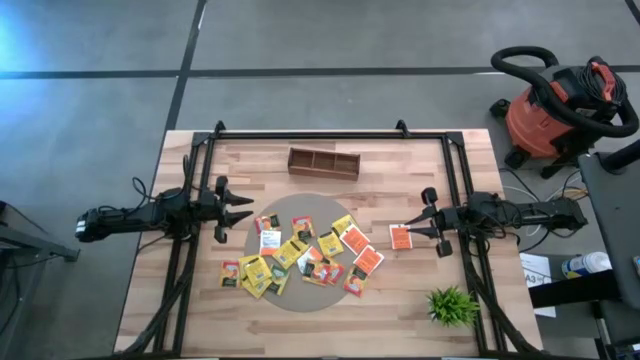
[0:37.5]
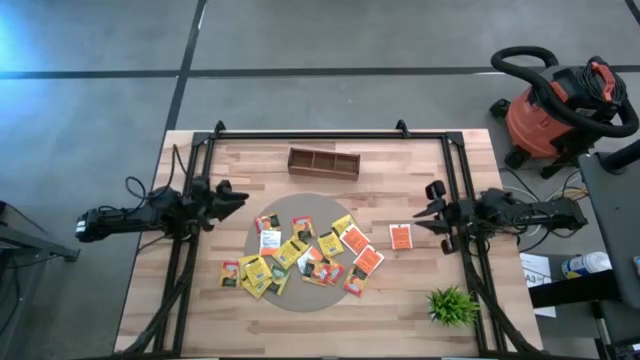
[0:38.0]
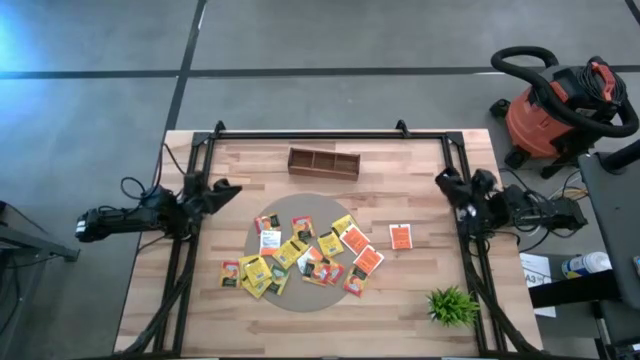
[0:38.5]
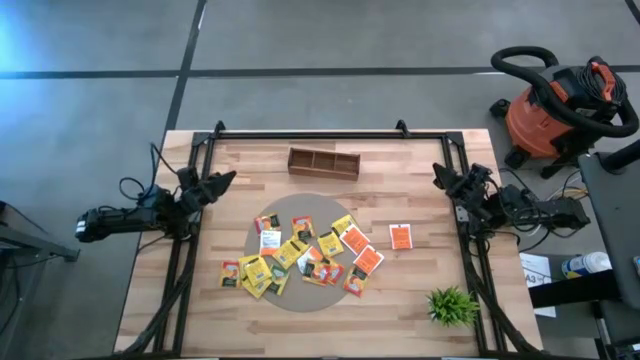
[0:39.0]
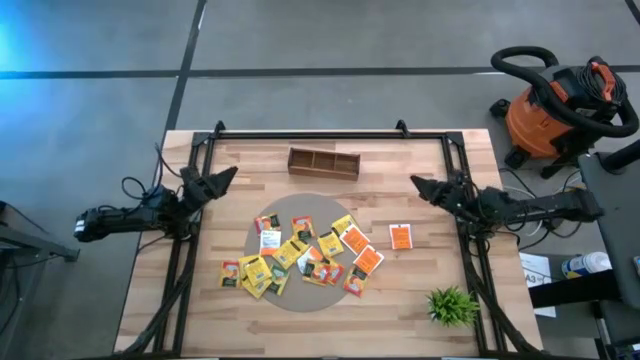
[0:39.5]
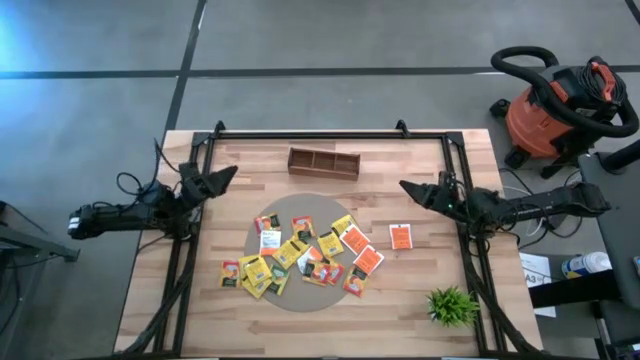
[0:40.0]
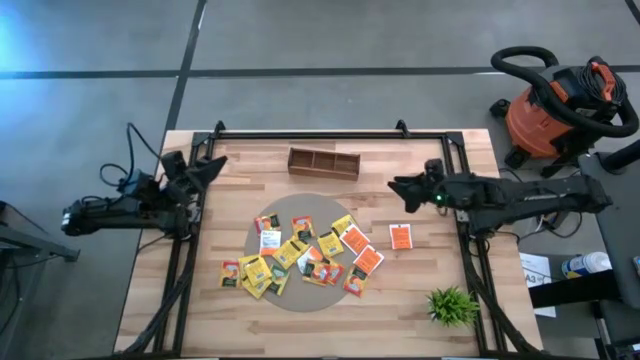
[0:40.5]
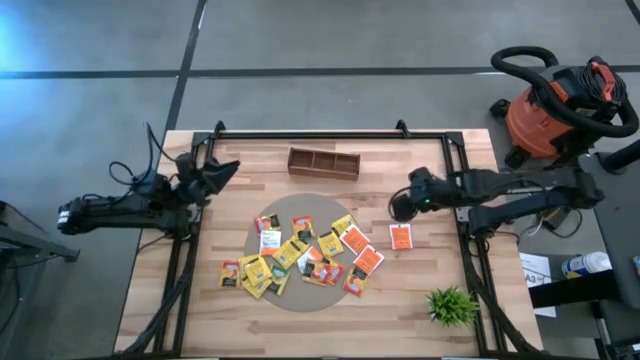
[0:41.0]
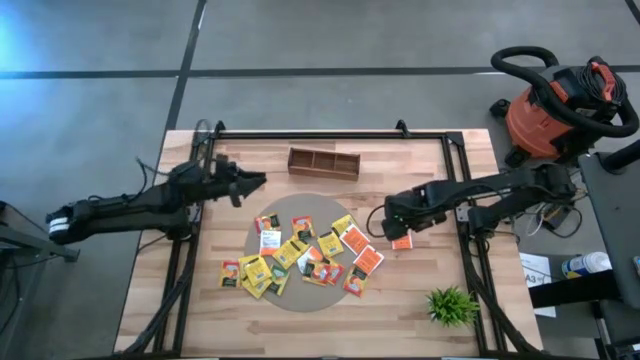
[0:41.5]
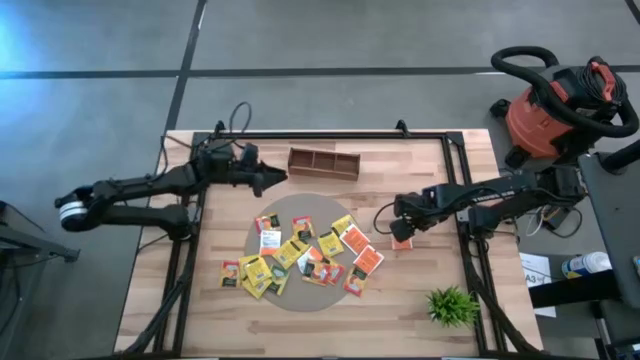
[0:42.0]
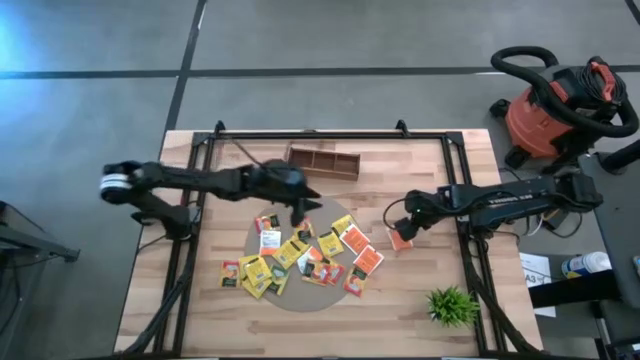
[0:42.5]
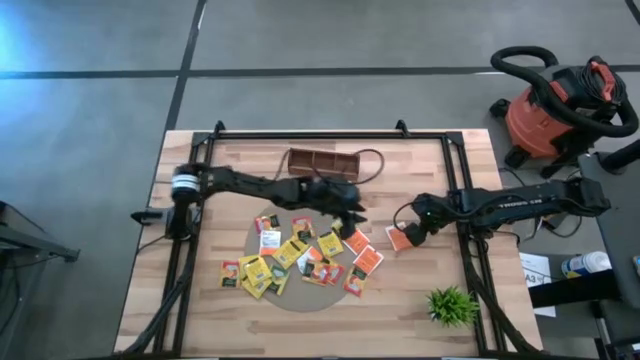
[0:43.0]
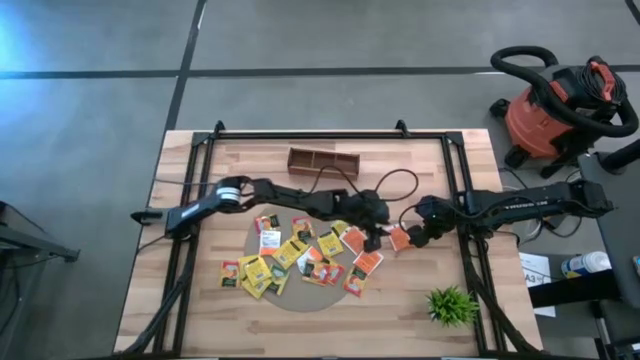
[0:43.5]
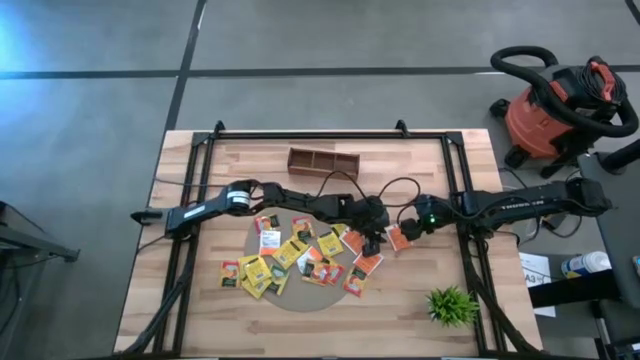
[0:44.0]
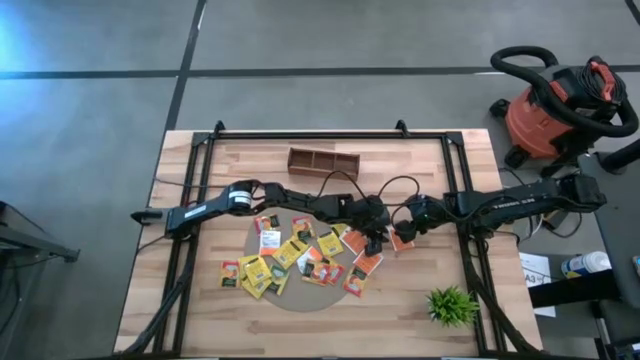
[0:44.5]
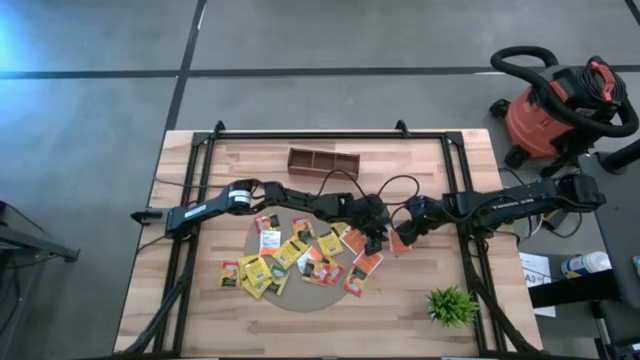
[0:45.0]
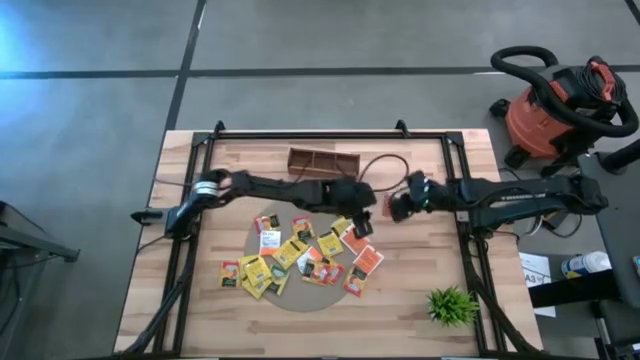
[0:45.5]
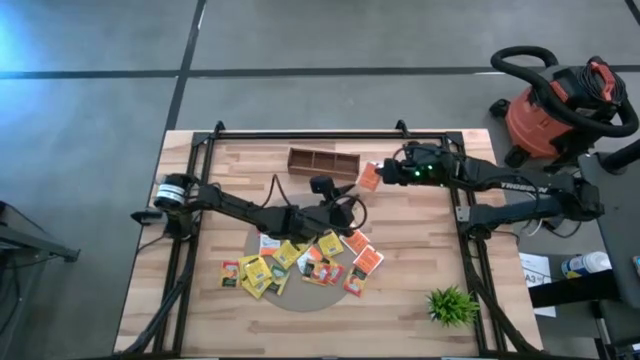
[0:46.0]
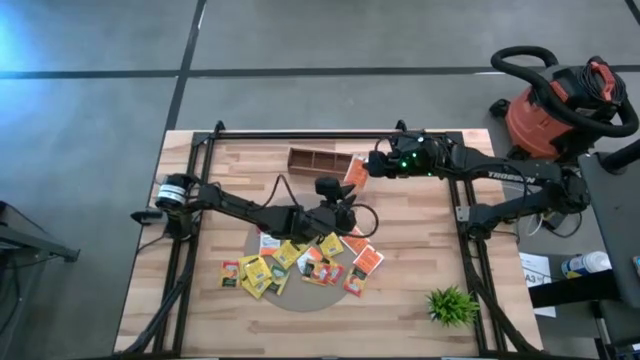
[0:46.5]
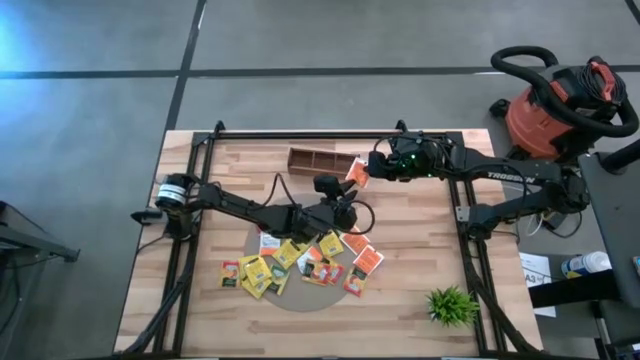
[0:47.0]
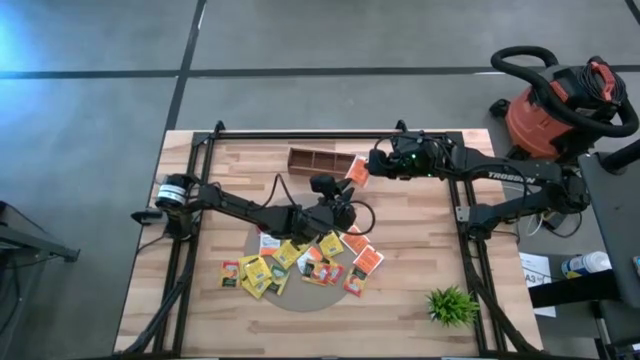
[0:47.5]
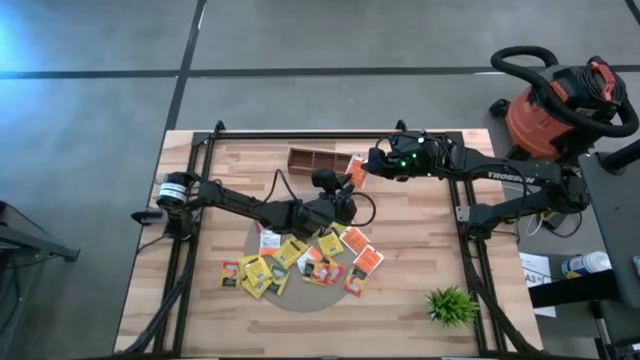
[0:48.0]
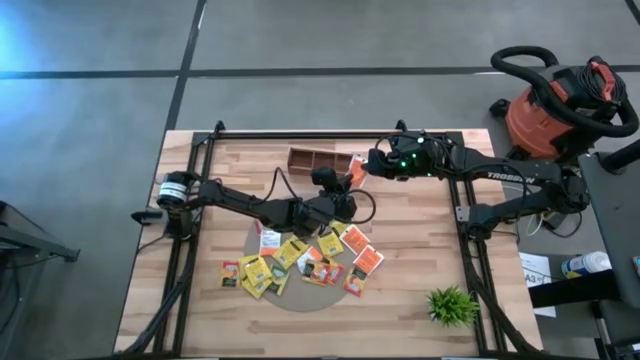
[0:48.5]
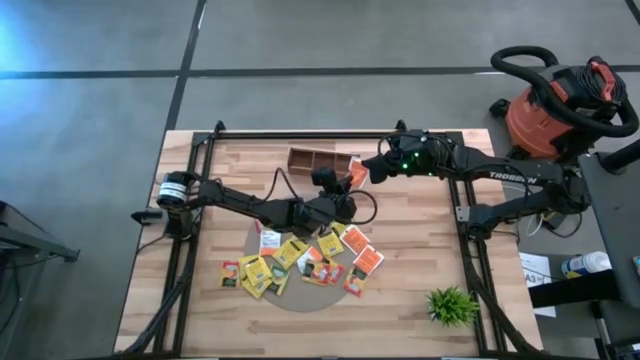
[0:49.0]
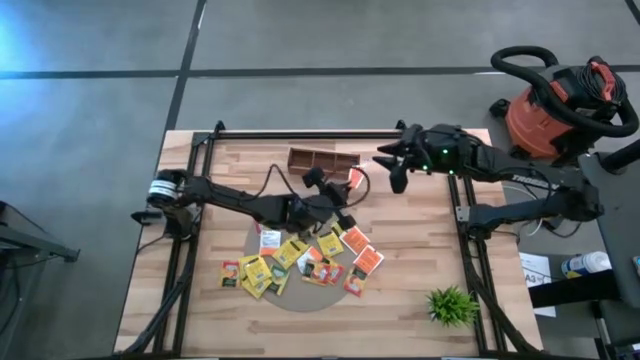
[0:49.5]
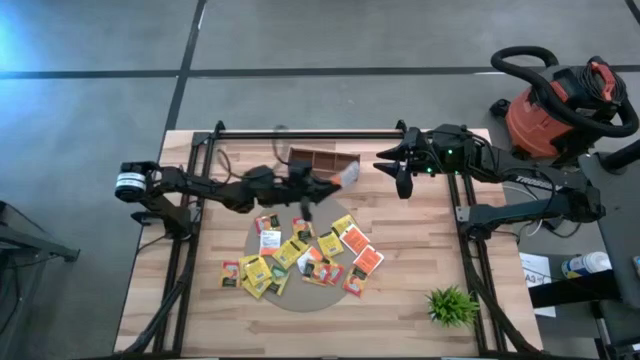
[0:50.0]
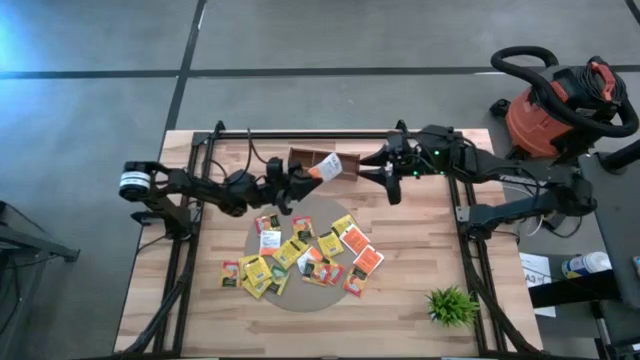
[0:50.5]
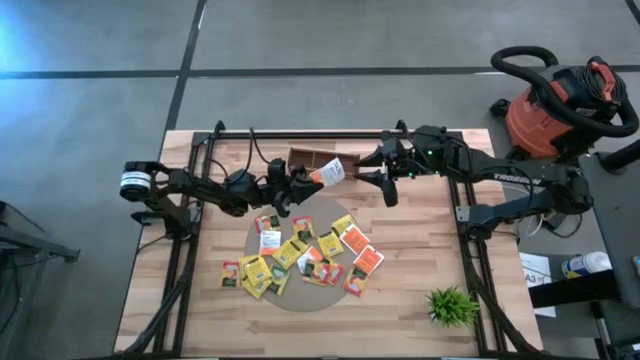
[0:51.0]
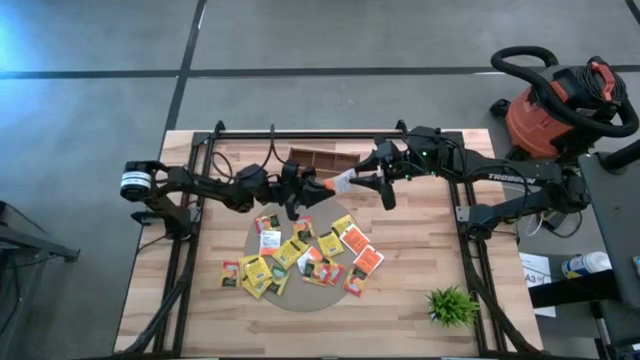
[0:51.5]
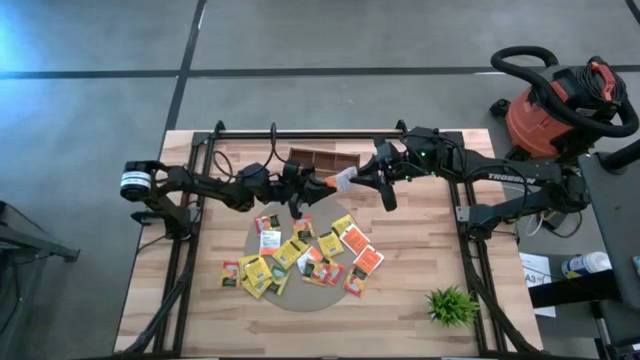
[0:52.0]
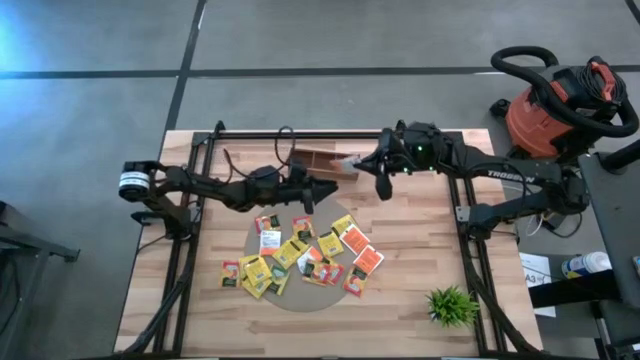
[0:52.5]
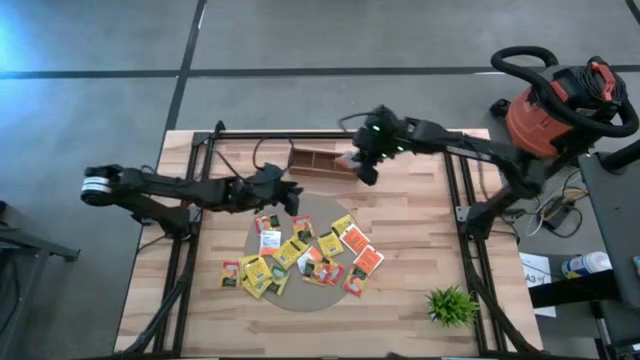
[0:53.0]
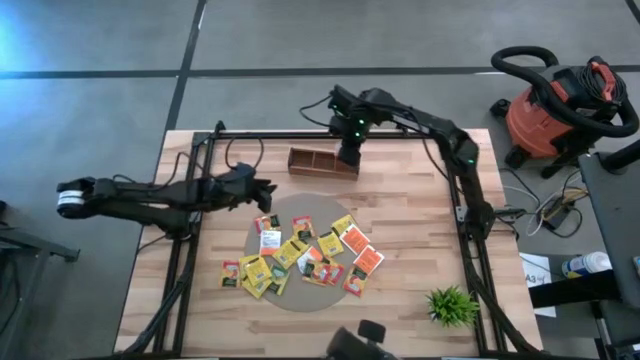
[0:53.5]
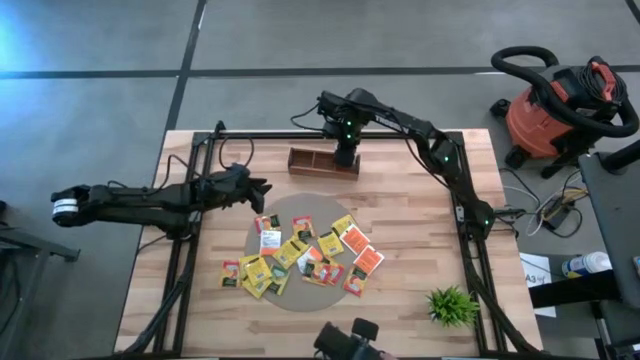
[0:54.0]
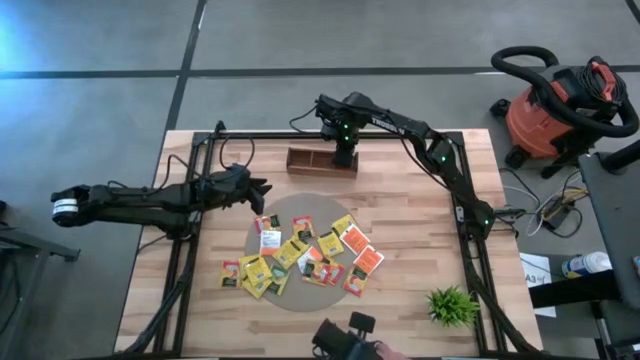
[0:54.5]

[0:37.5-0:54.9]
Task: Pick & Place Tea
Put the white tea bag into the right compartment of the wooden organizer

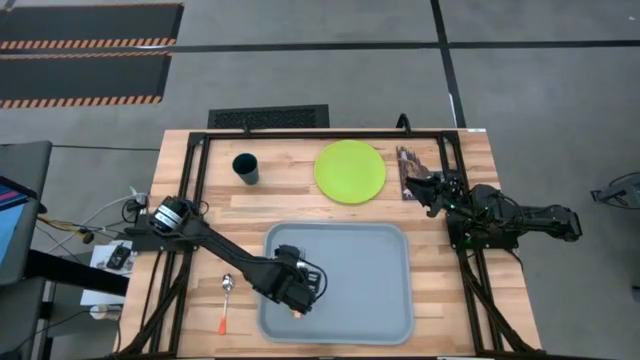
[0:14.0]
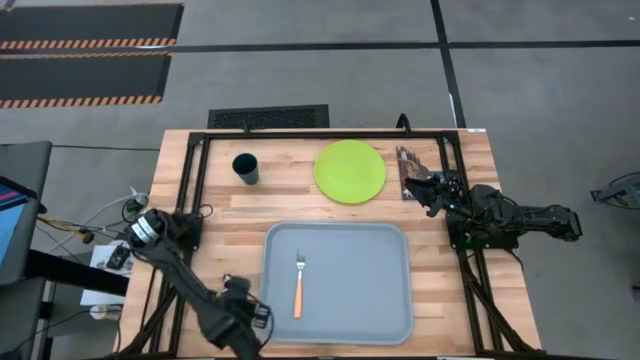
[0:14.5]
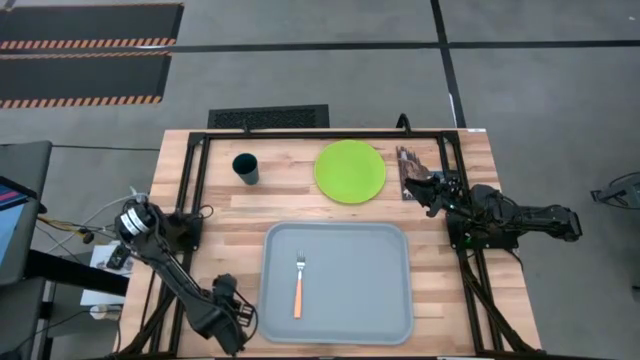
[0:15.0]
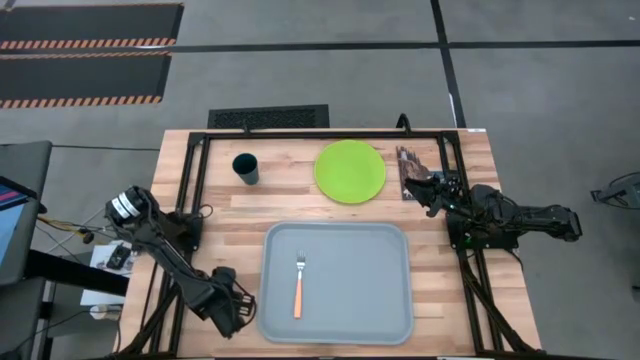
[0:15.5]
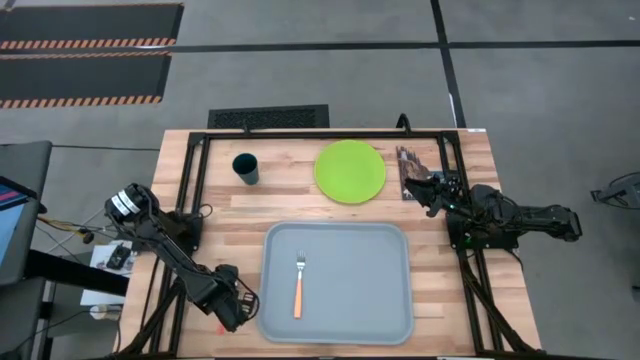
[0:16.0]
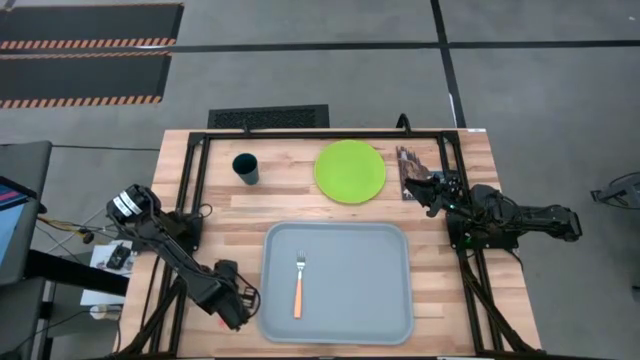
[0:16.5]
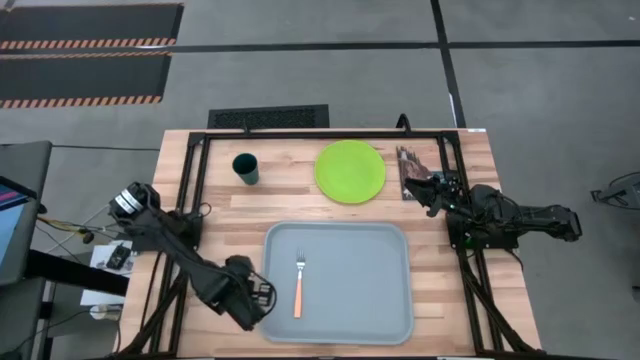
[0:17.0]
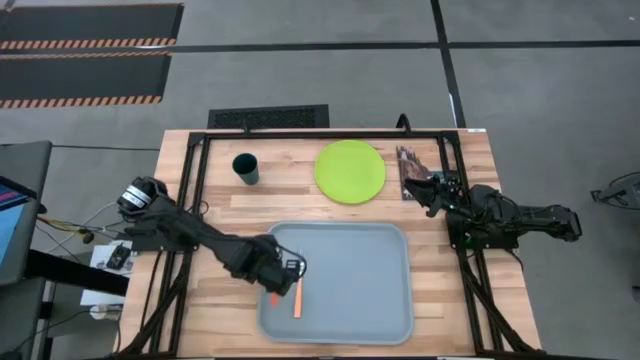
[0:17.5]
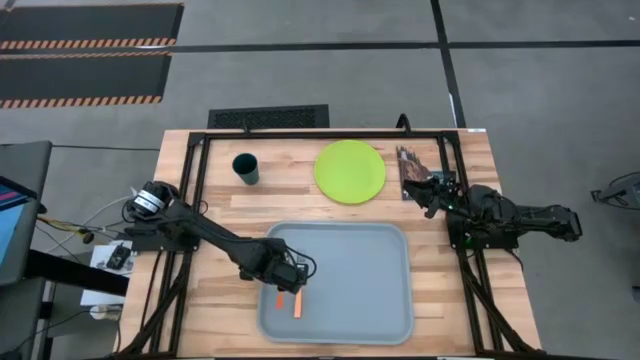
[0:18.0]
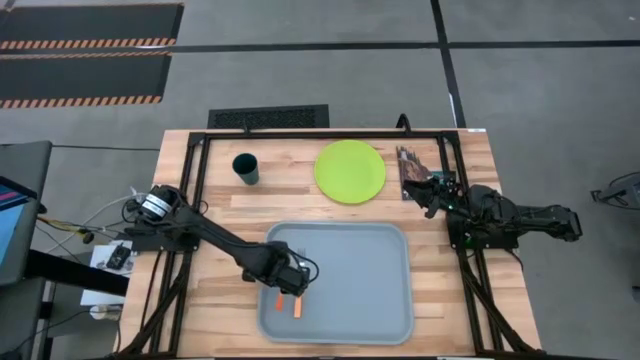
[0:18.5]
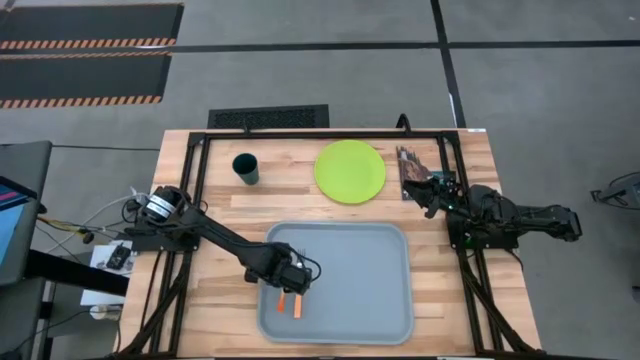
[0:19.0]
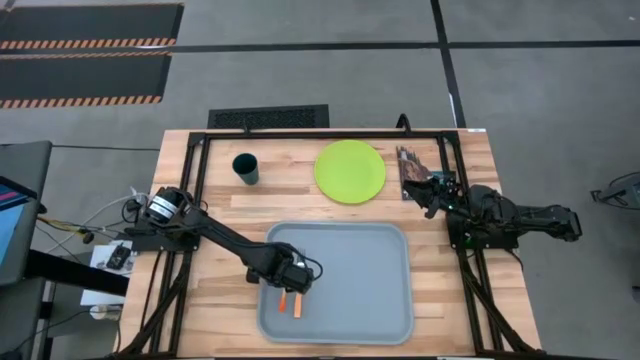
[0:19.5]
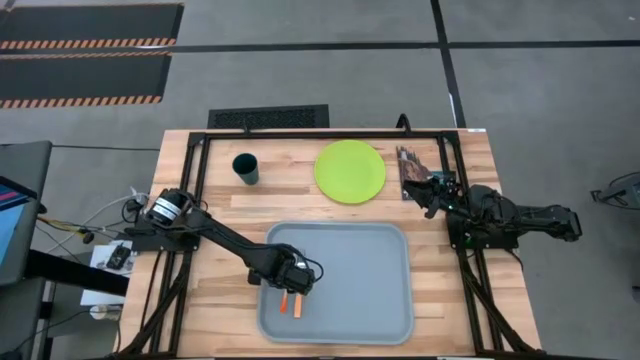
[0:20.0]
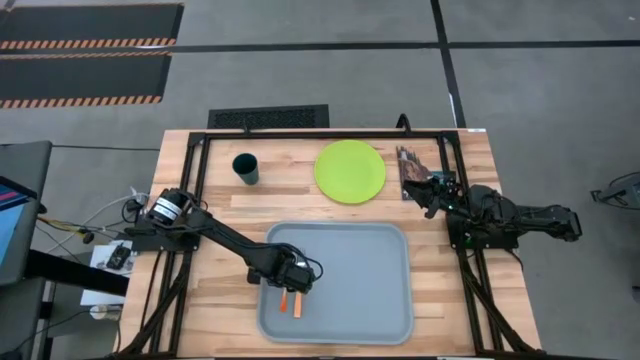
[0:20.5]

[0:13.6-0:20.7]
Task: Pick and place plate/cup/fork/spoon on tray
Put the orange spoon on the gray tray to the left of the yellow fork
